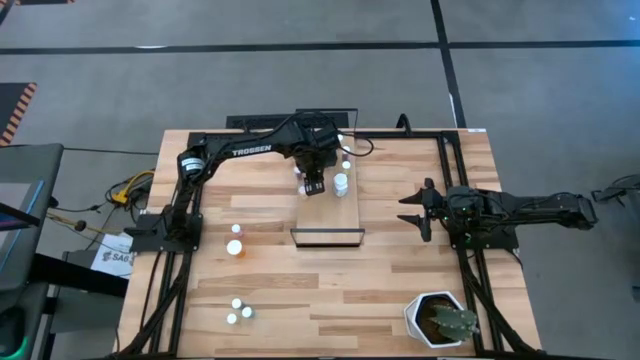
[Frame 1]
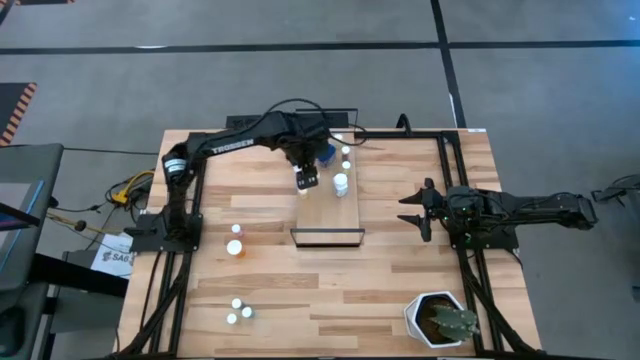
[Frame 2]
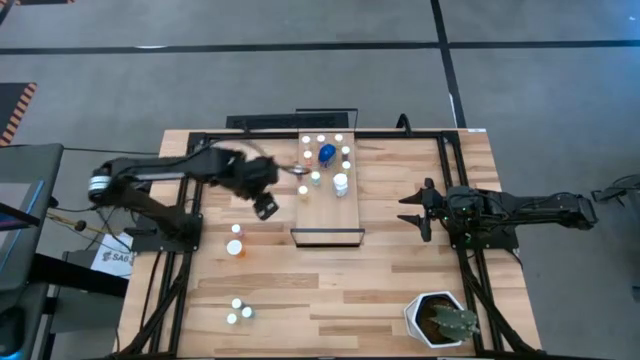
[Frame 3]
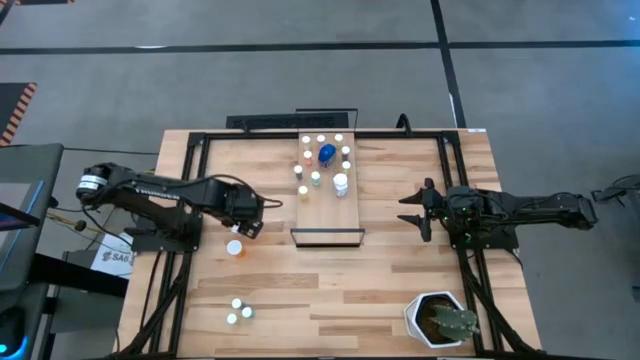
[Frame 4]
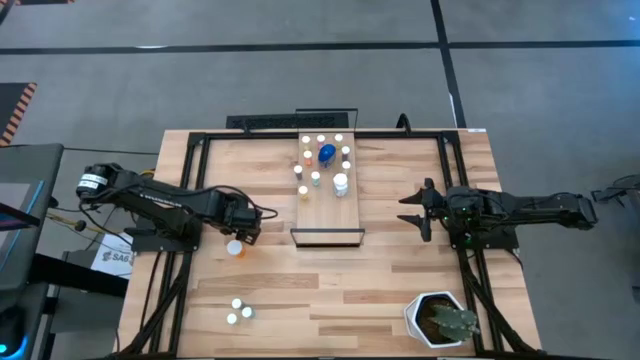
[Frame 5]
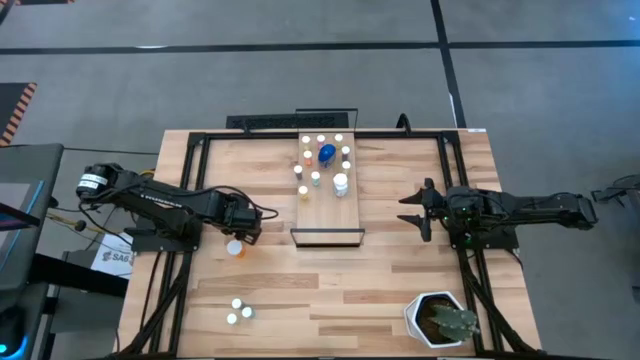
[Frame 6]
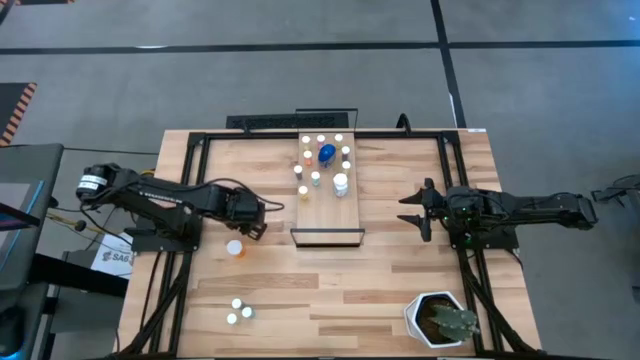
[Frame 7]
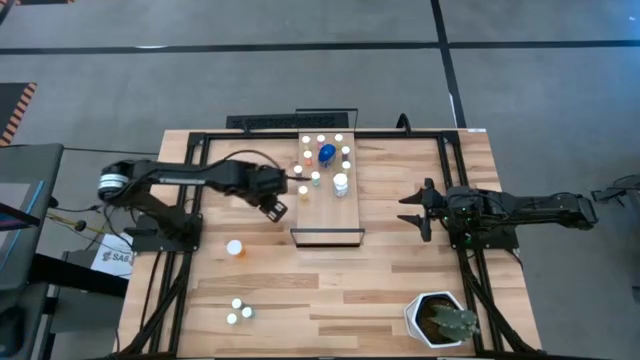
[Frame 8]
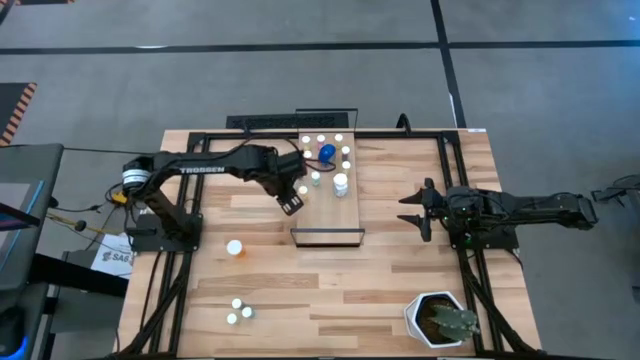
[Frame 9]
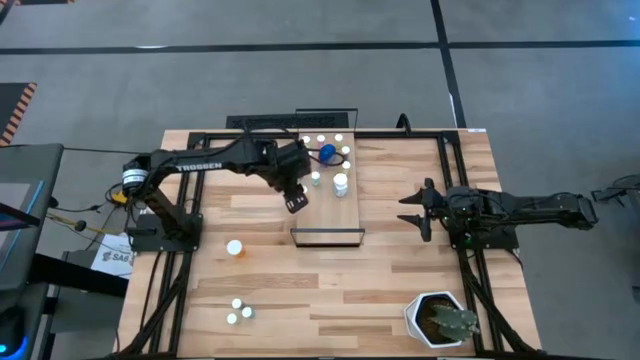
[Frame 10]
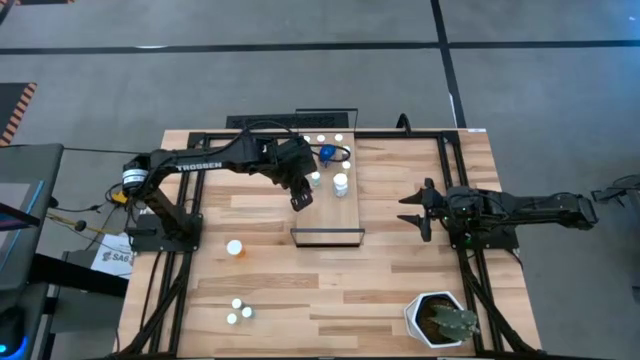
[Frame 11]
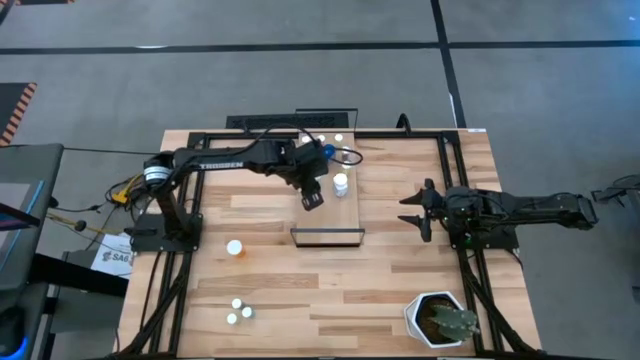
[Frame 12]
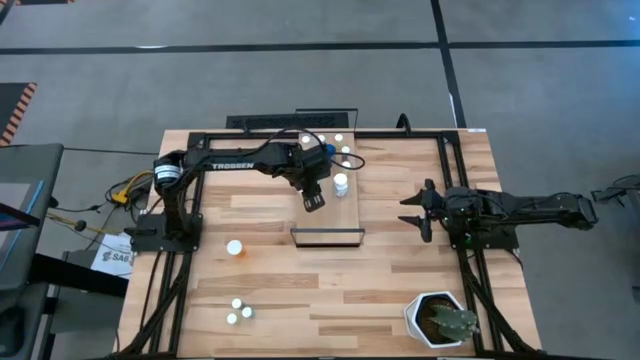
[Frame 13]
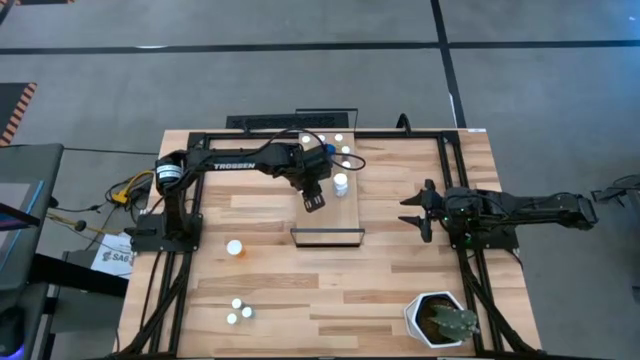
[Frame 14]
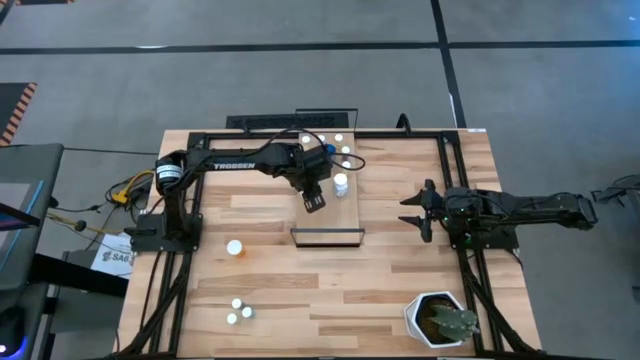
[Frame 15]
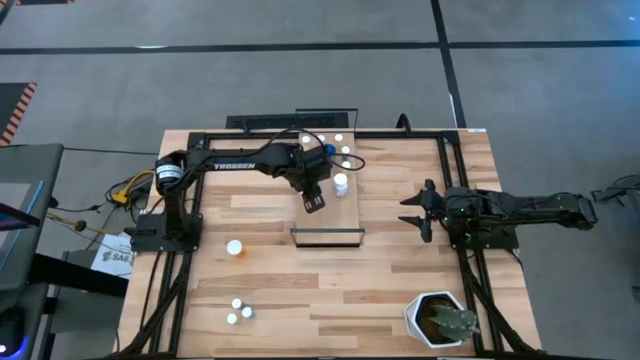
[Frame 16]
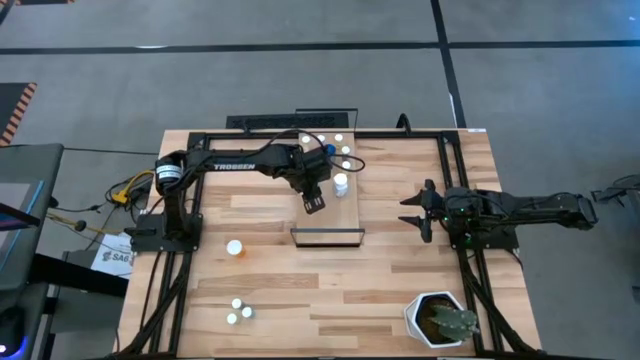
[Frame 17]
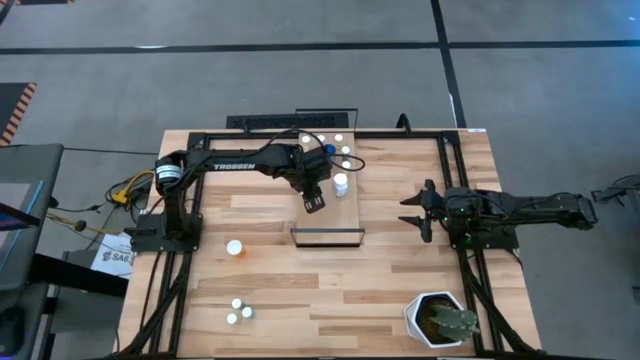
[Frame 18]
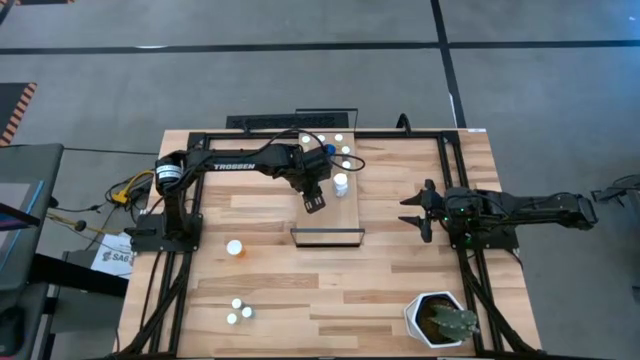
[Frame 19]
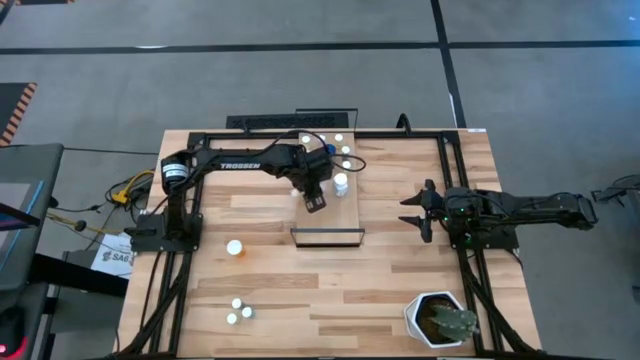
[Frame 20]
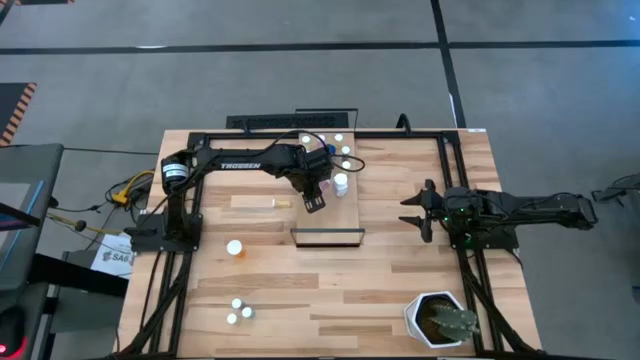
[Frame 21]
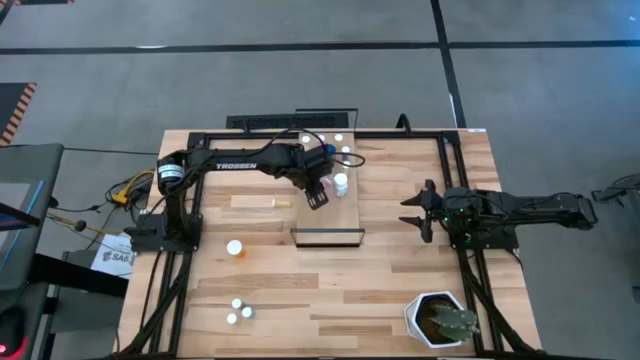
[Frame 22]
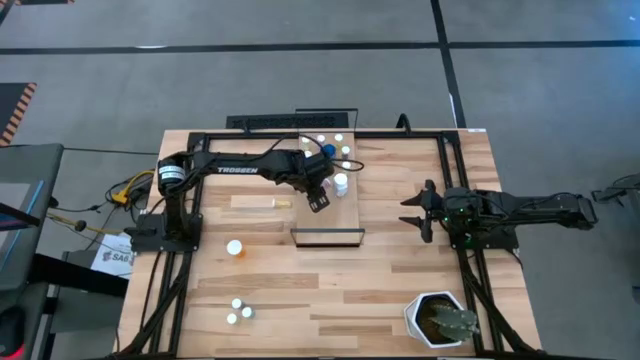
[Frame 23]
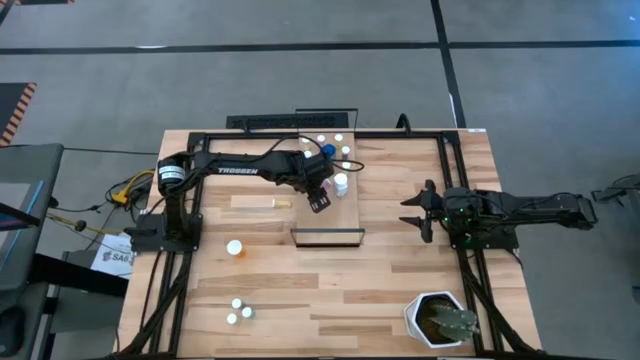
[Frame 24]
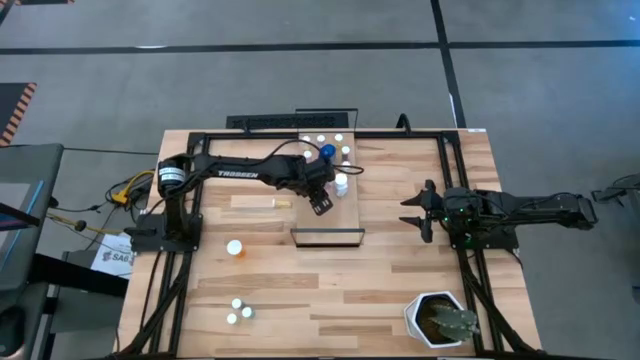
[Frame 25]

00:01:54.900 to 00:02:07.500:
Task: Pick and place medicine bottles onto shelf by color
Put the pink pill bottle on the shelf

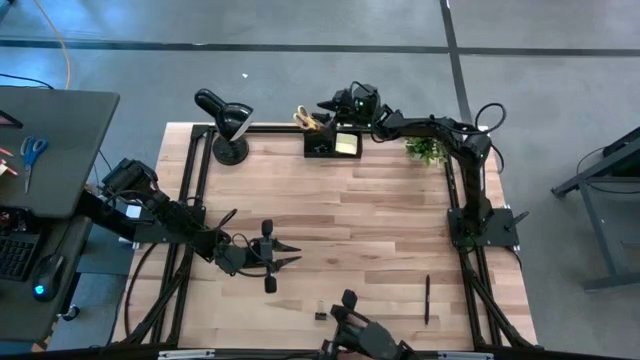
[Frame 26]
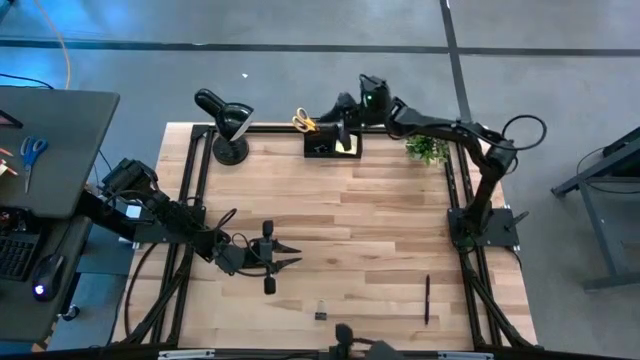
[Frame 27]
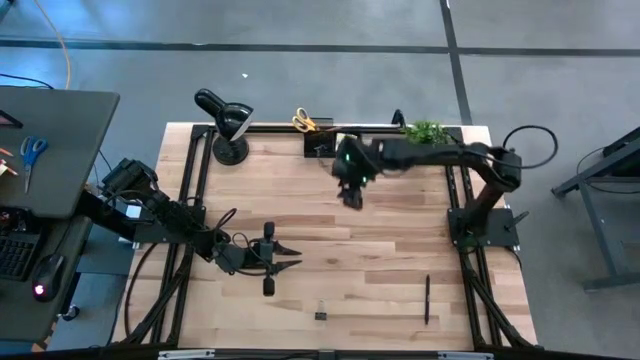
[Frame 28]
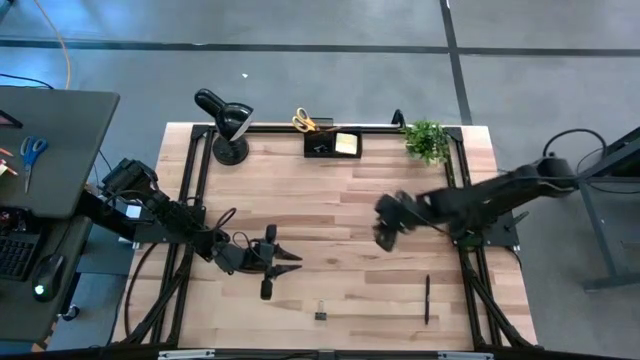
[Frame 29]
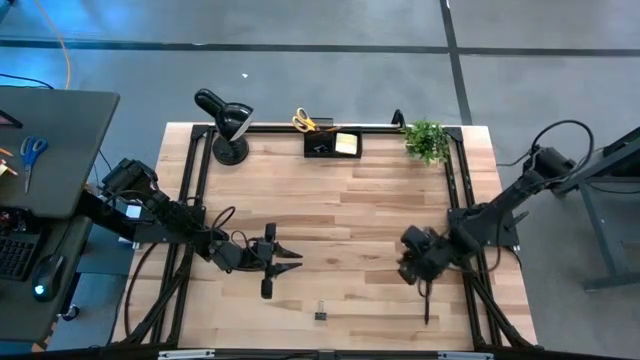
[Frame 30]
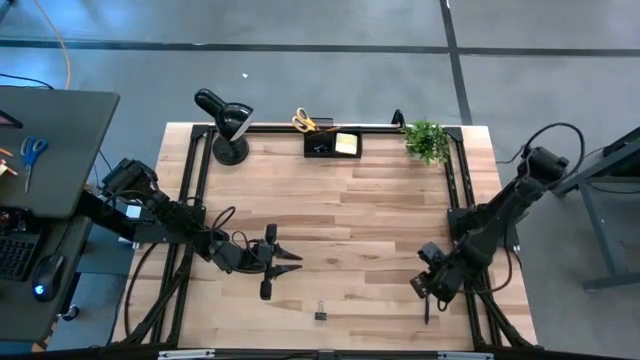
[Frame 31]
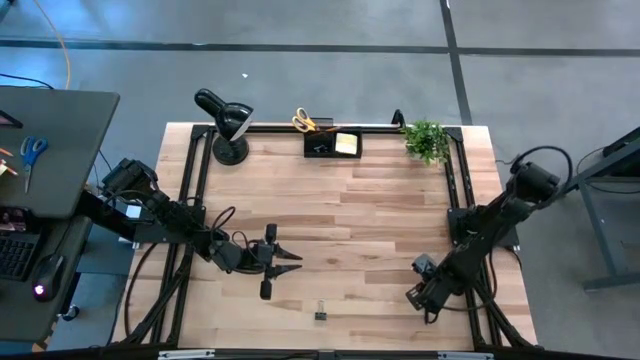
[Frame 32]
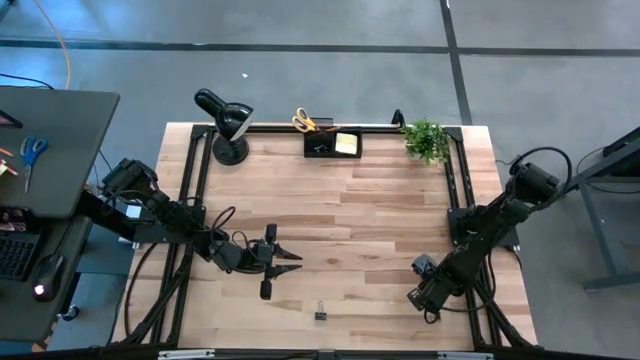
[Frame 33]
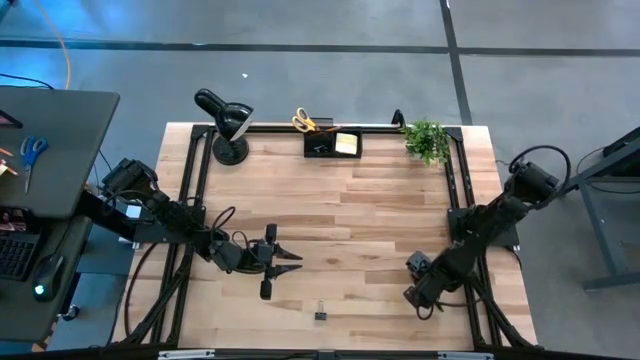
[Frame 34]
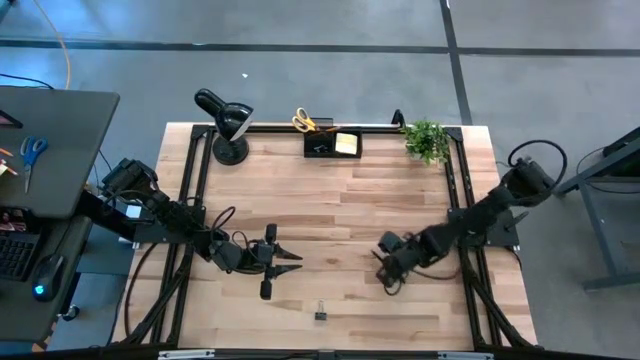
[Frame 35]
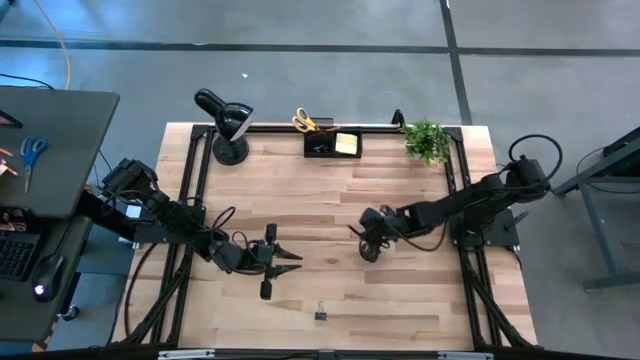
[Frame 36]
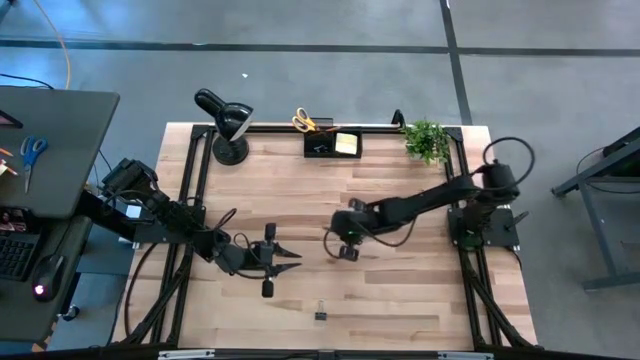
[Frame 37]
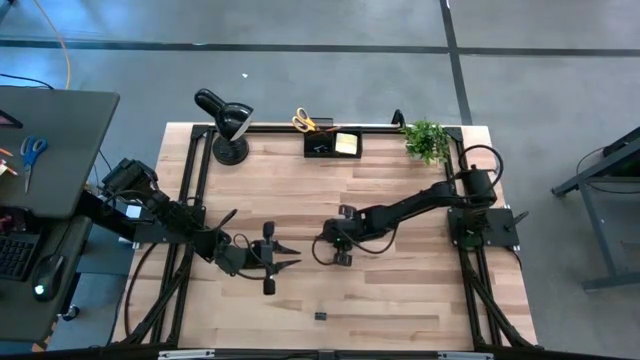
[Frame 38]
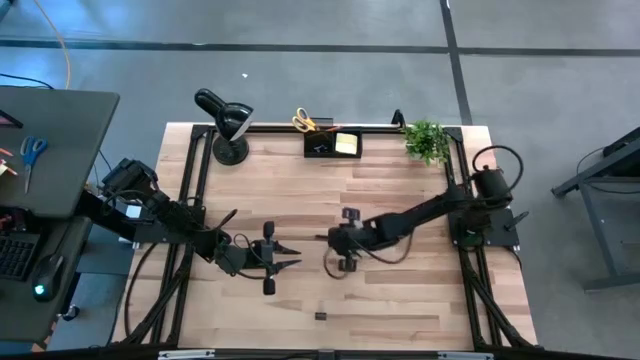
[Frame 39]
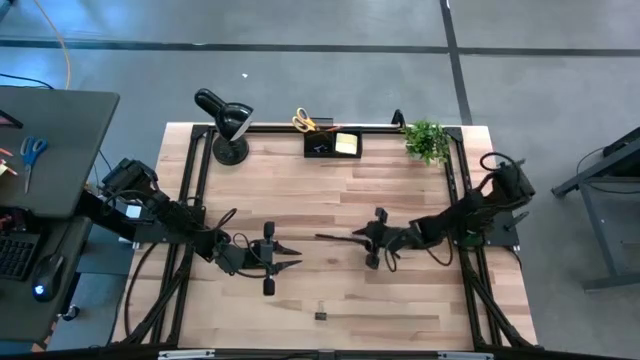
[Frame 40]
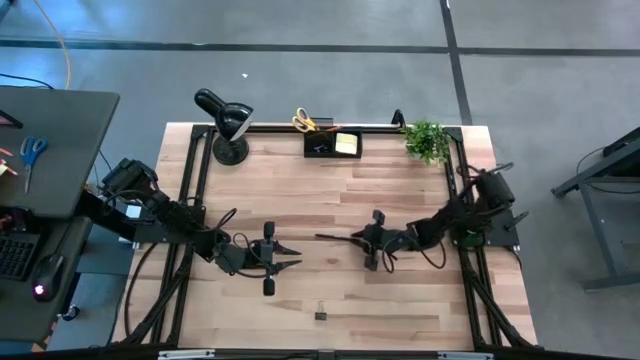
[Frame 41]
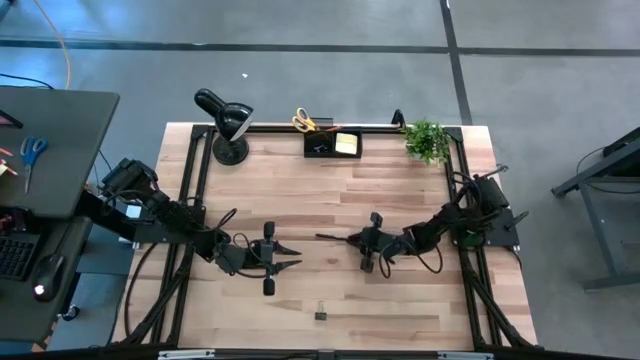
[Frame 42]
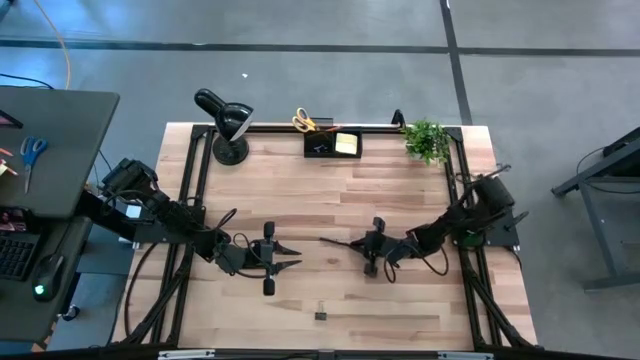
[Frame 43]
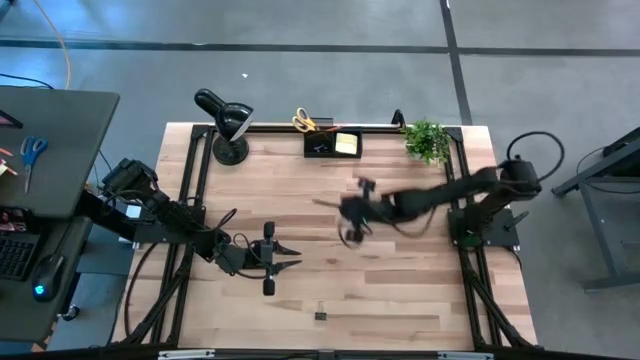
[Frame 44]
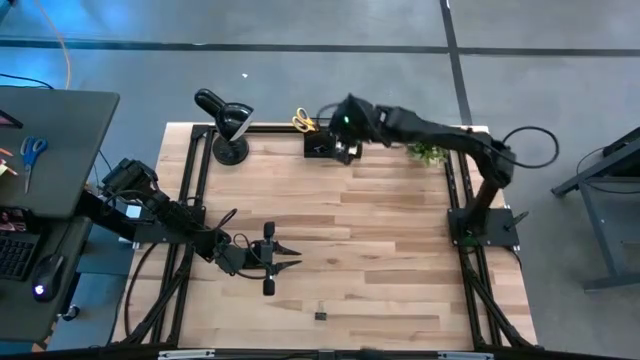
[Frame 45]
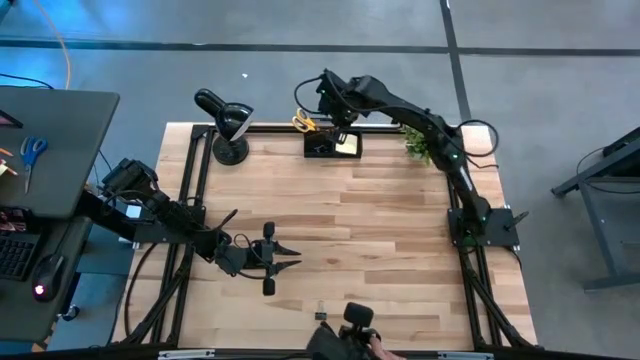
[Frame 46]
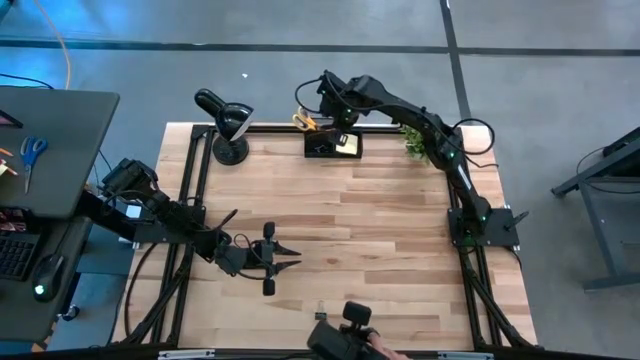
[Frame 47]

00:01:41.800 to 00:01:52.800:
Task: Pick and place office supplies into organizer
Put the black pen into the black desk organizer
